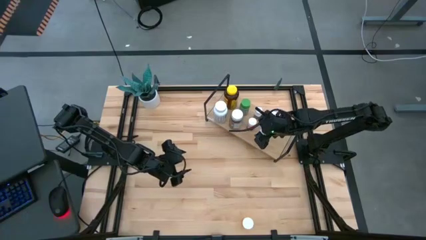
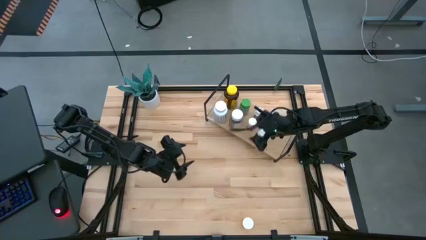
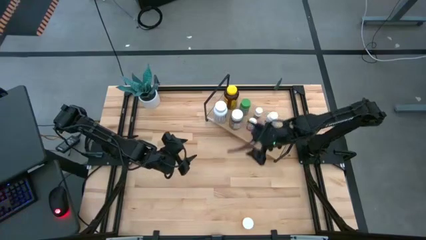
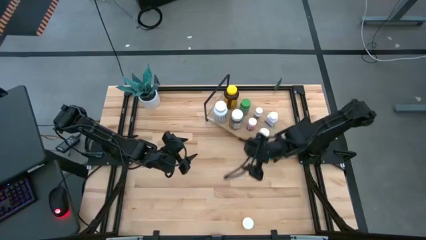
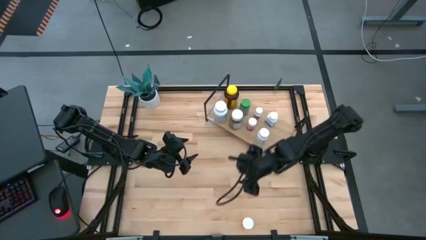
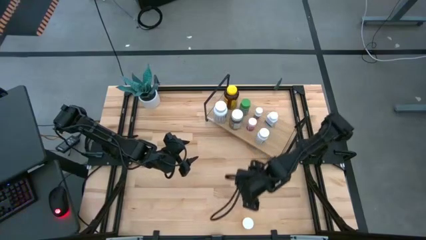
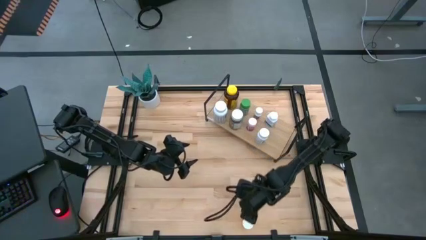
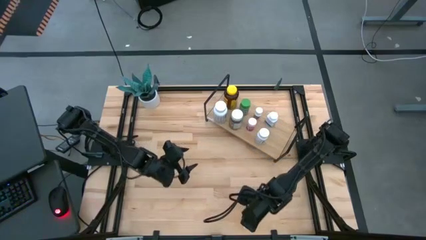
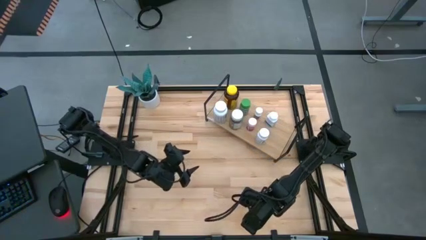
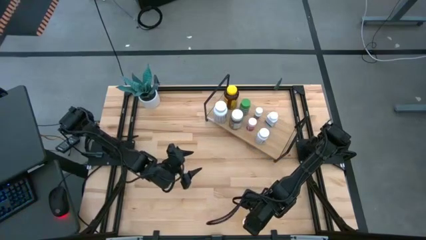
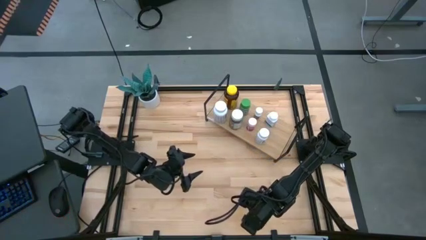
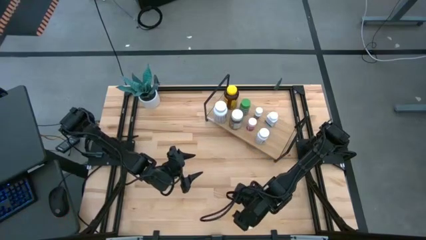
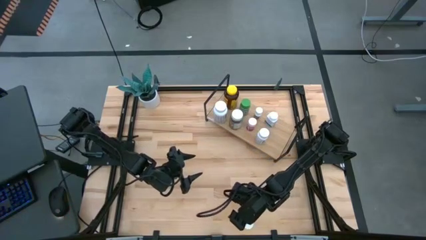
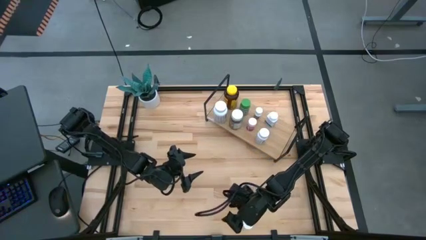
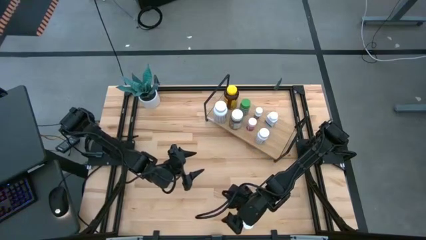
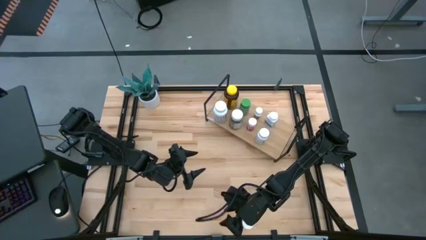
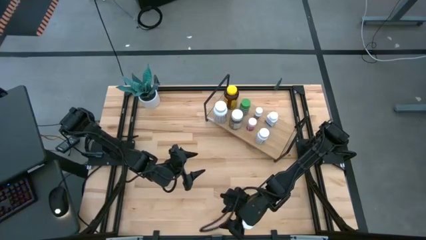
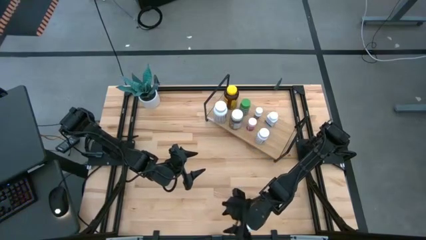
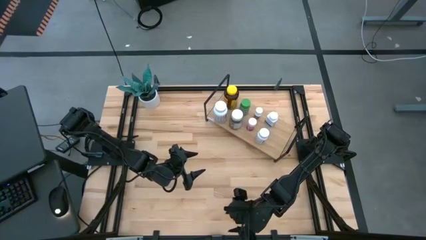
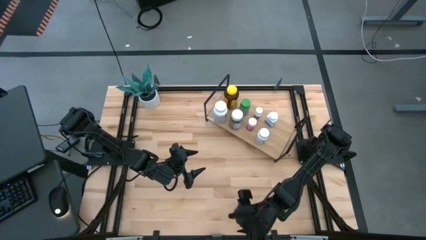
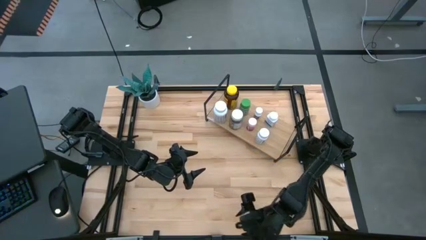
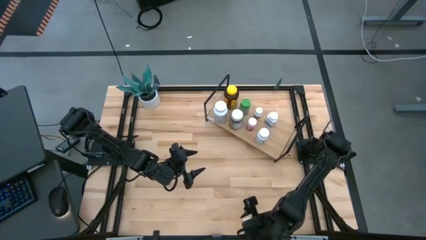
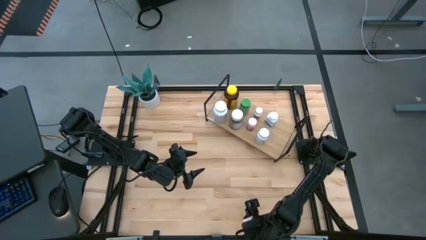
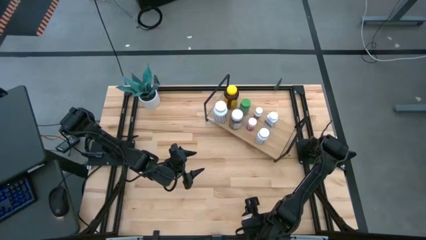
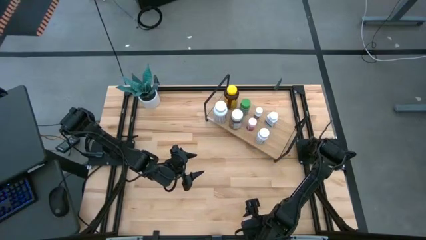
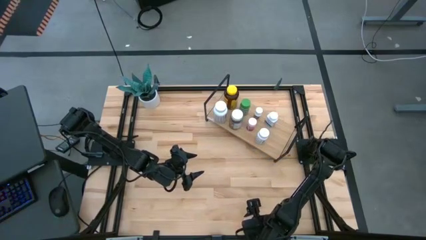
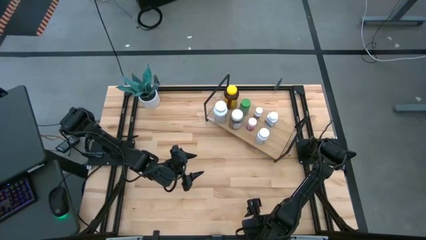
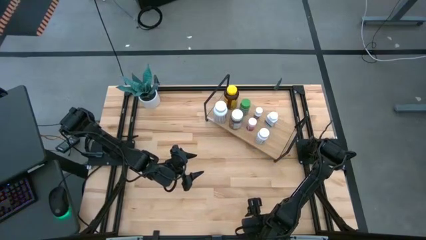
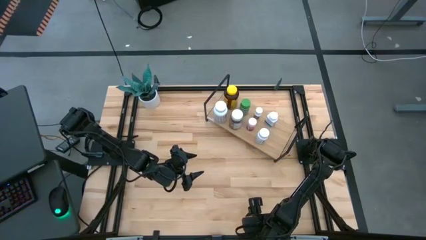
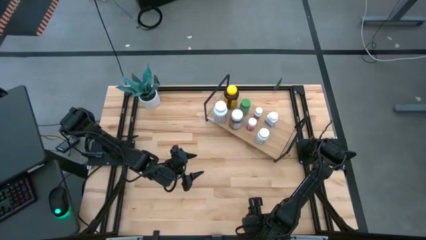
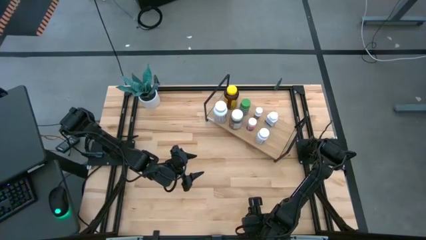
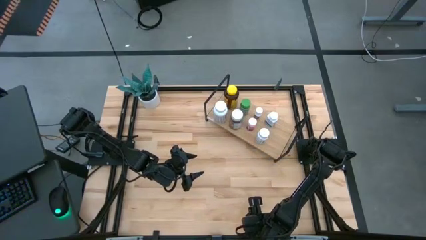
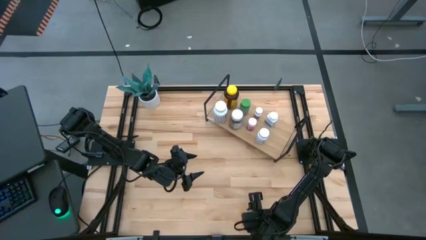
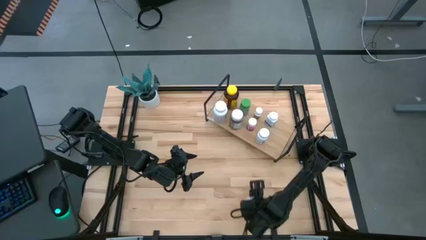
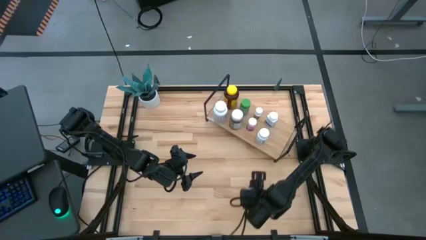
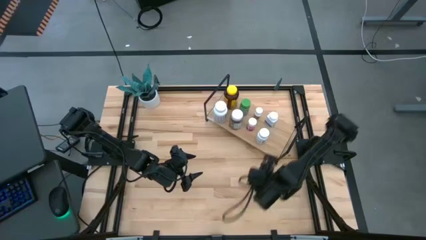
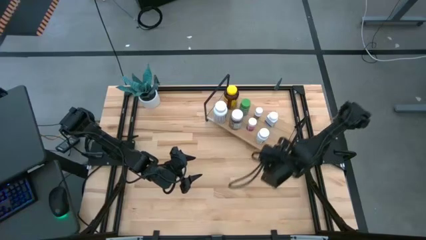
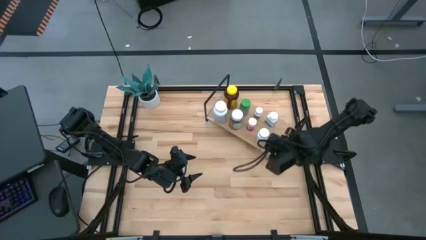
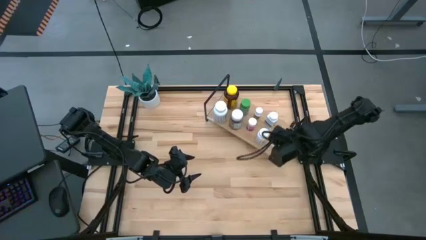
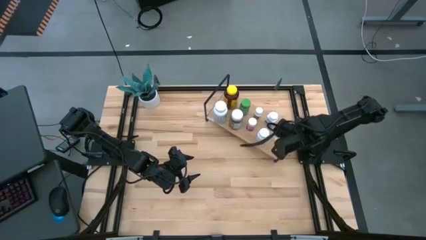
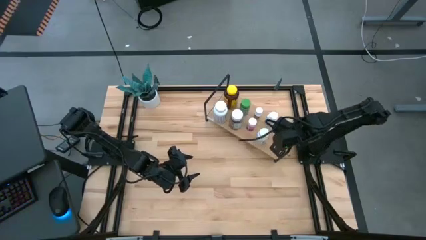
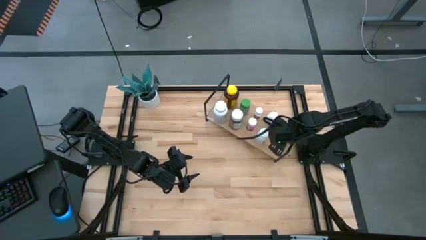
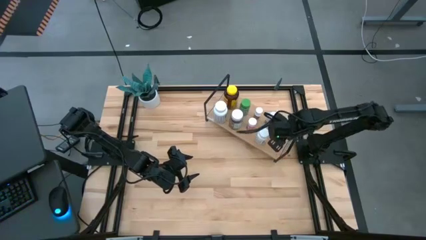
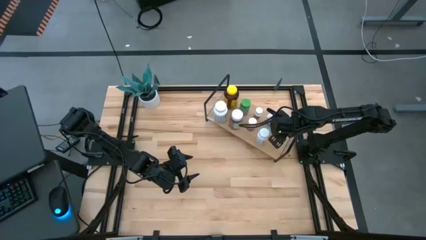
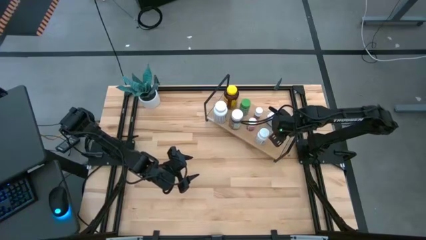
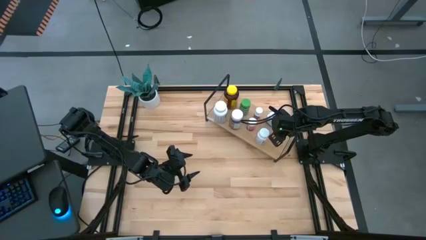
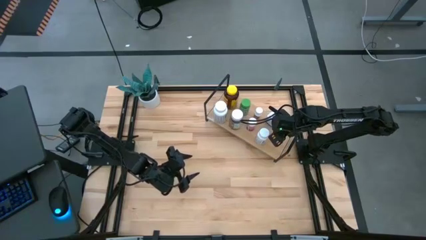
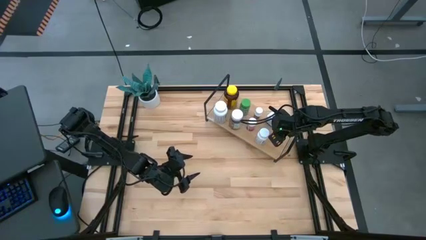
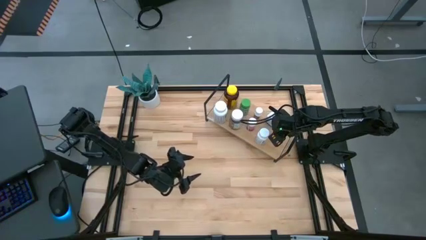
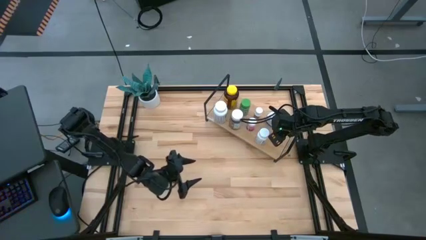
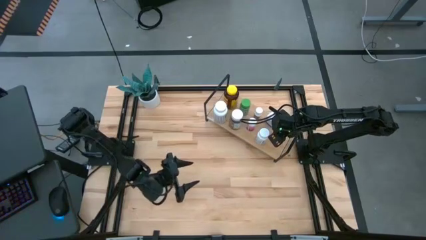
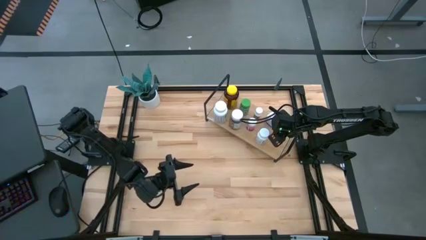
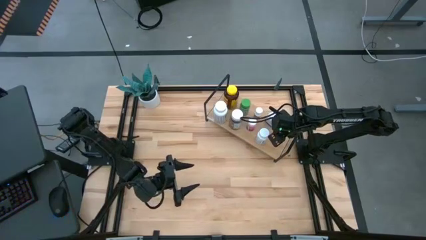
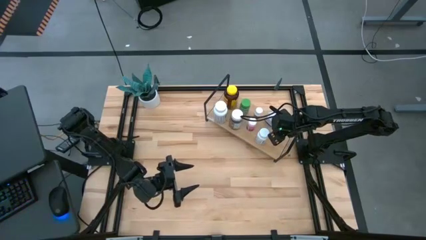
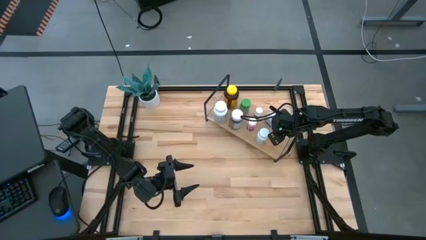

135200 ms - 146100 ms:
Task: Pick and place medicine bottles onto shelf by color
Put the orange pill bottle on the shelf

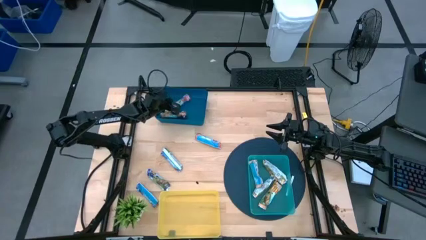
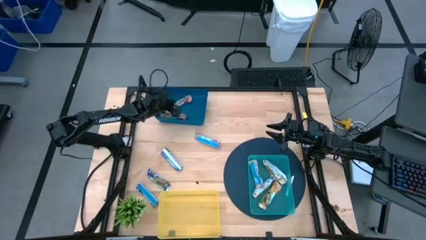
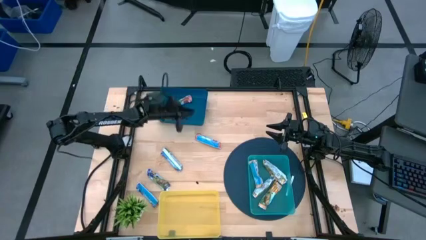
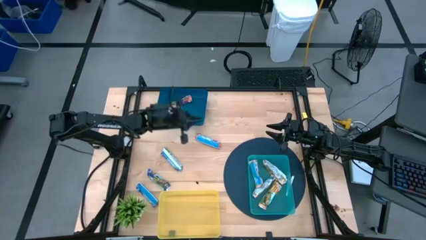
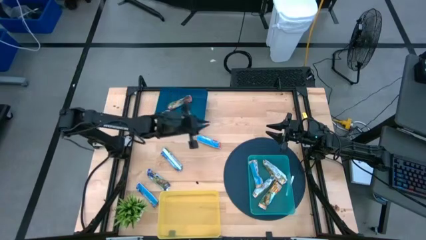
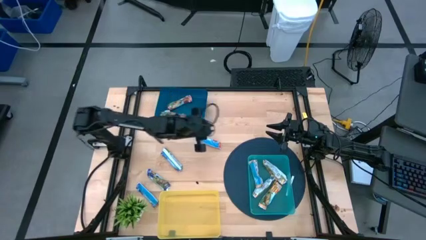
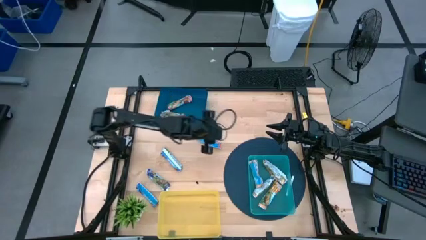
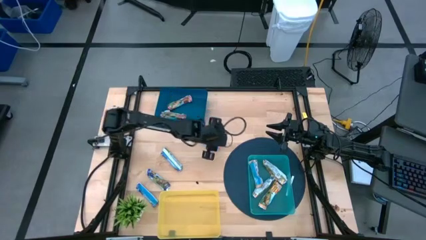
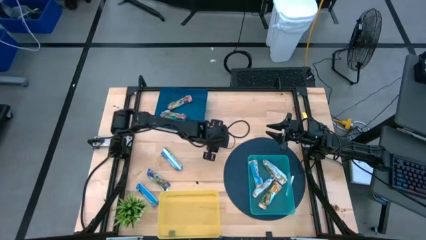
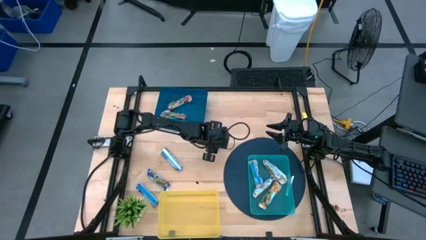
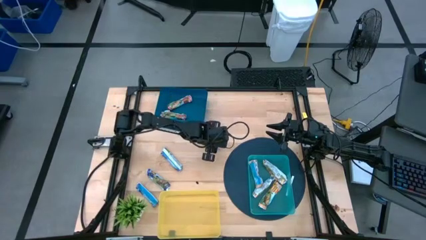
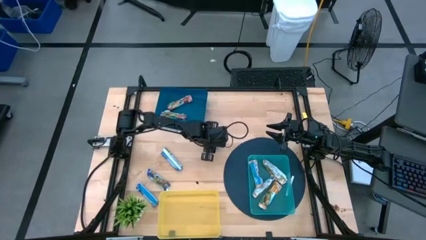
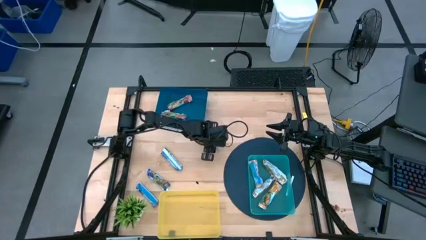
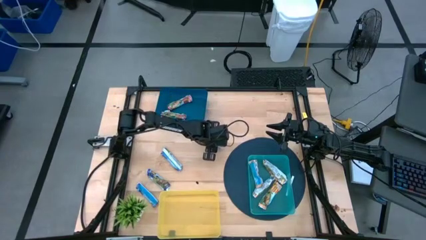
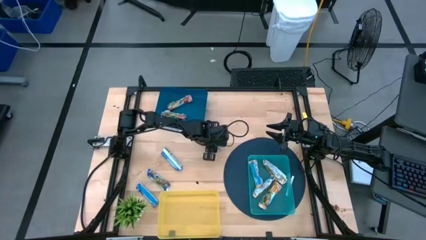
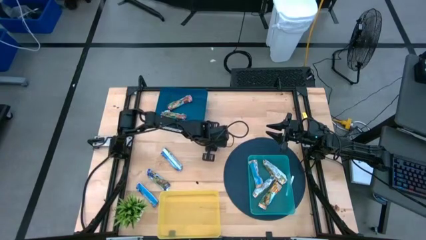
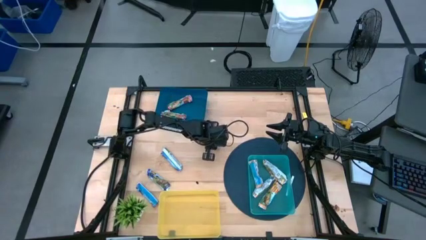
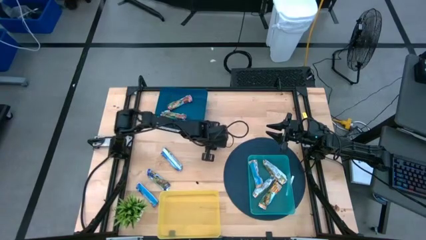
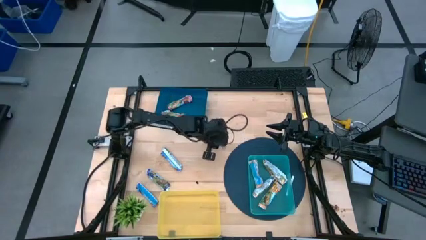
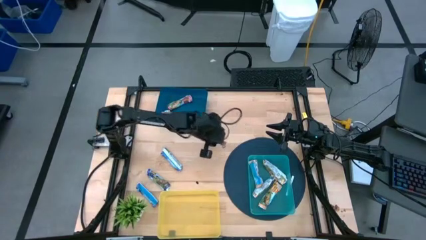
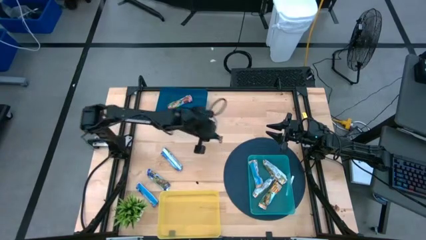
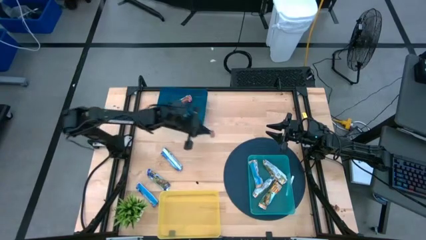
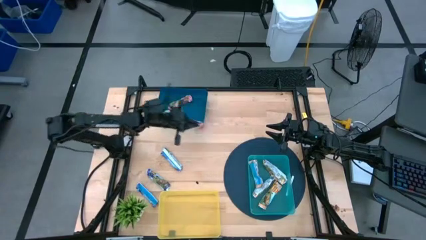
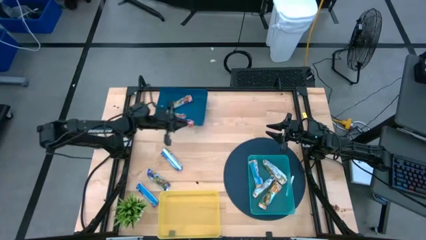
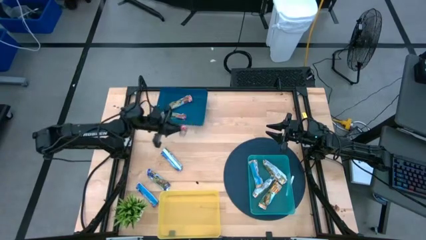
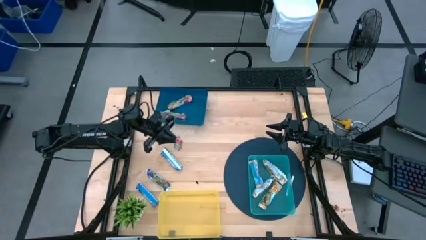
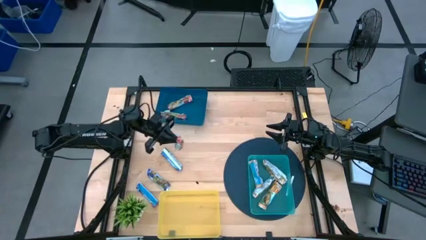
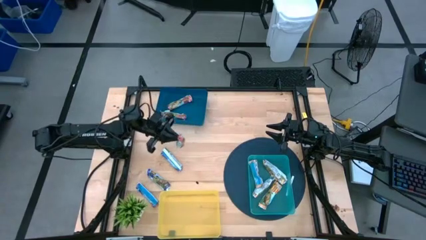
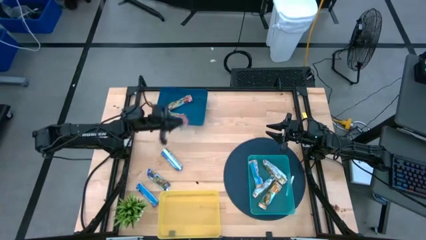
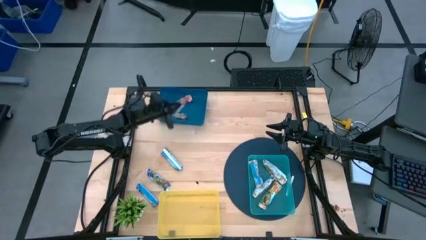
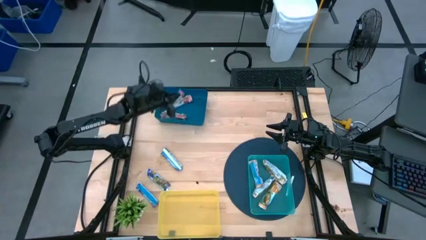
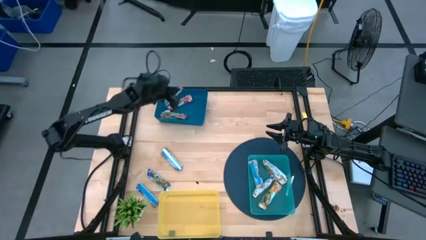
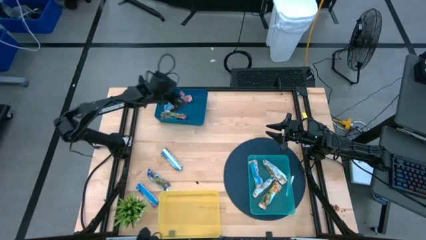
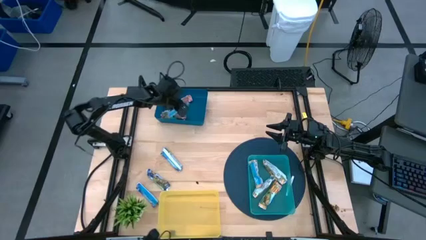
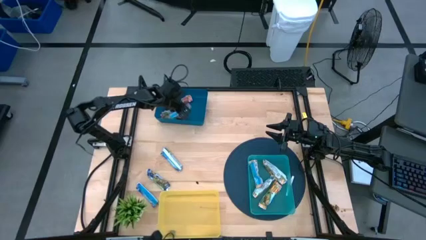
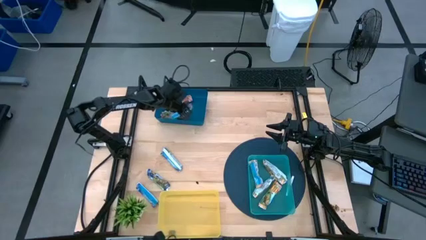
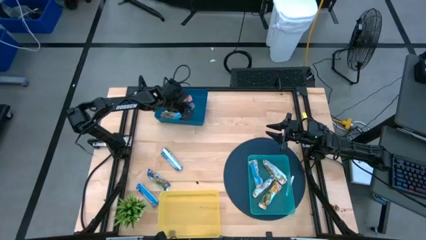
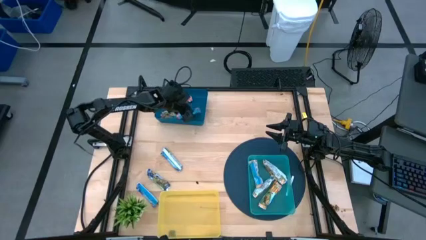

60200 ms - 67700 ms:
Task: Pick and place Granola Bars by type
Put the red granola bar into the blue bin
